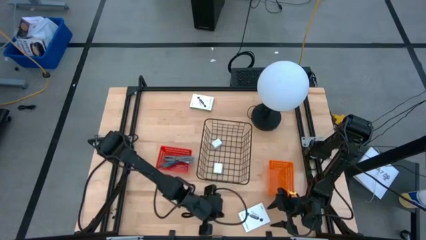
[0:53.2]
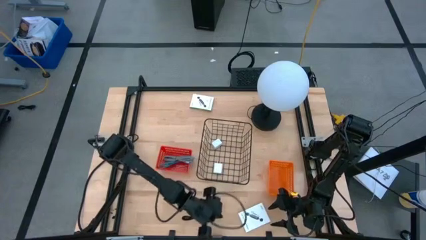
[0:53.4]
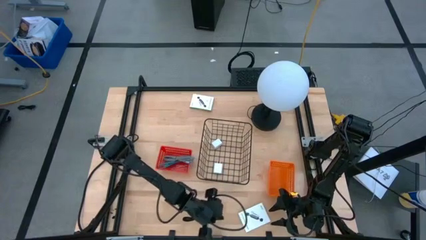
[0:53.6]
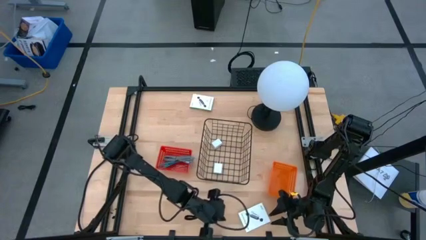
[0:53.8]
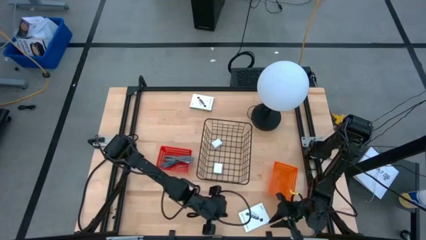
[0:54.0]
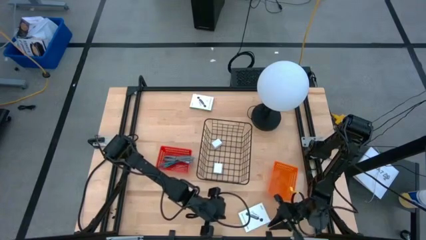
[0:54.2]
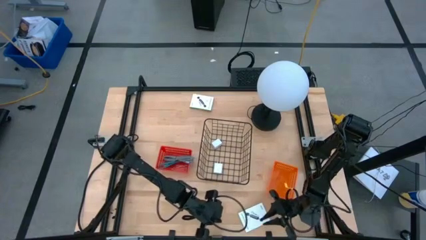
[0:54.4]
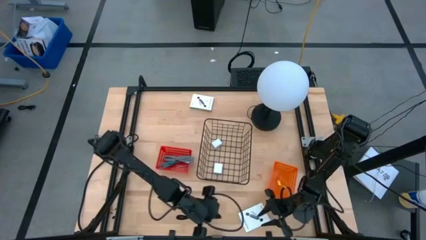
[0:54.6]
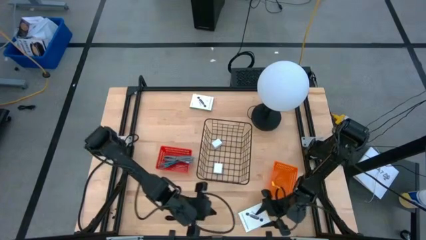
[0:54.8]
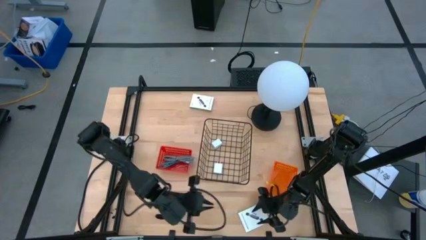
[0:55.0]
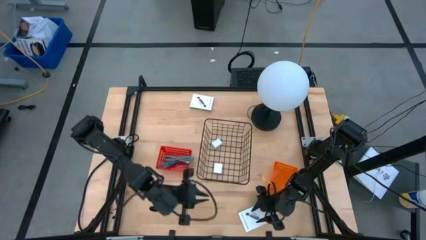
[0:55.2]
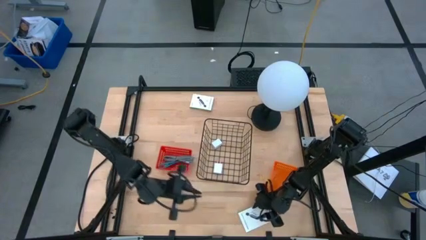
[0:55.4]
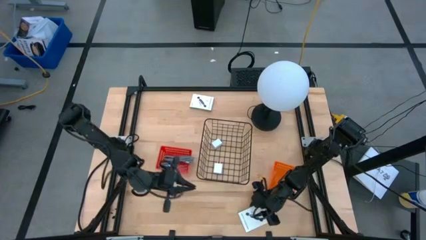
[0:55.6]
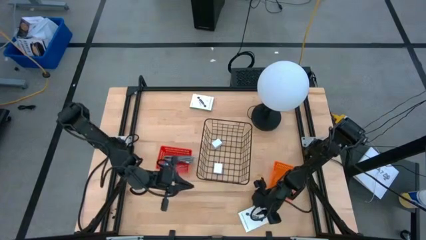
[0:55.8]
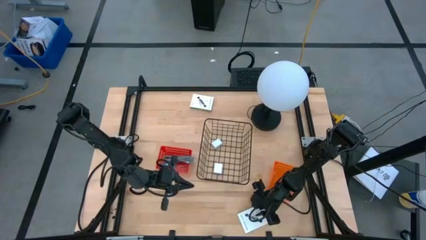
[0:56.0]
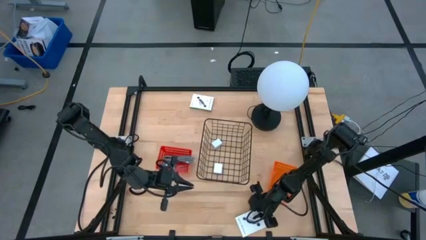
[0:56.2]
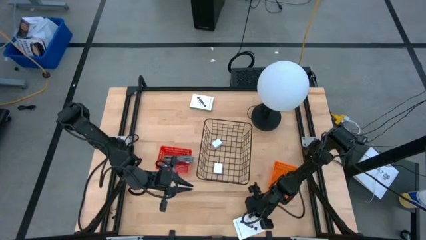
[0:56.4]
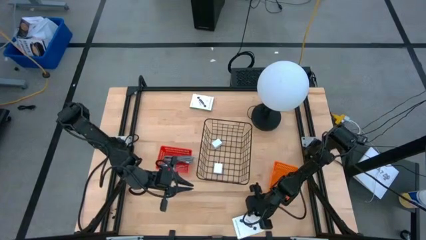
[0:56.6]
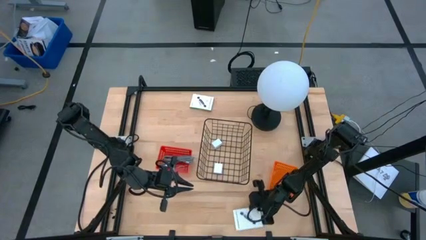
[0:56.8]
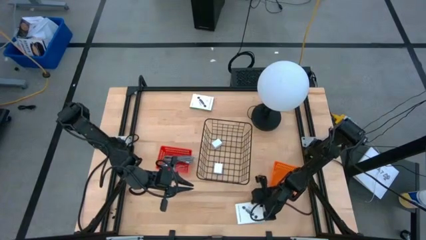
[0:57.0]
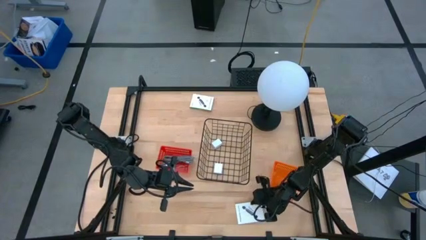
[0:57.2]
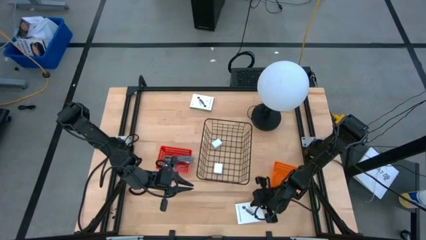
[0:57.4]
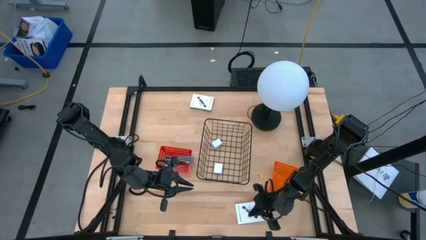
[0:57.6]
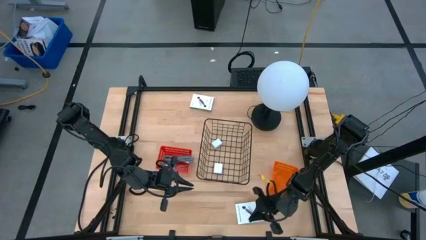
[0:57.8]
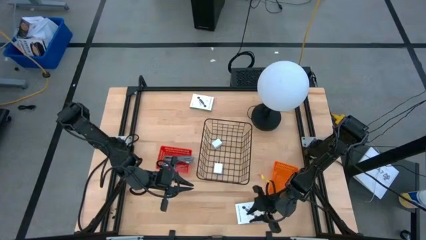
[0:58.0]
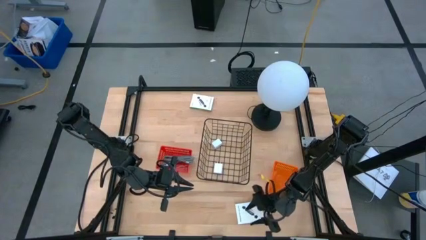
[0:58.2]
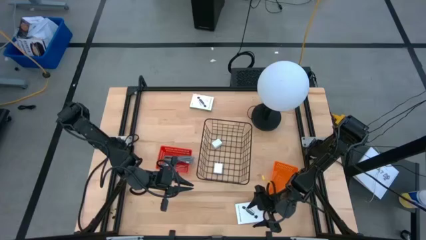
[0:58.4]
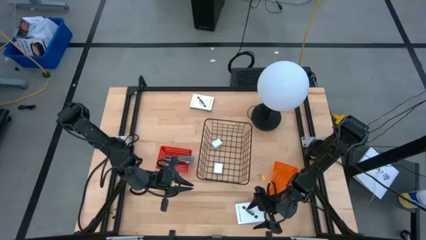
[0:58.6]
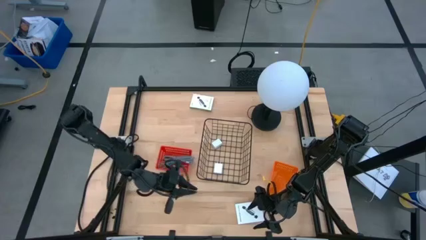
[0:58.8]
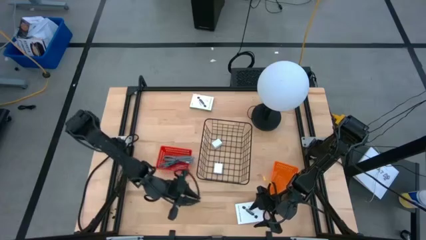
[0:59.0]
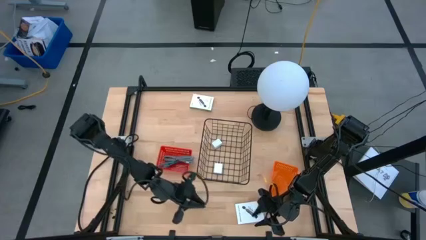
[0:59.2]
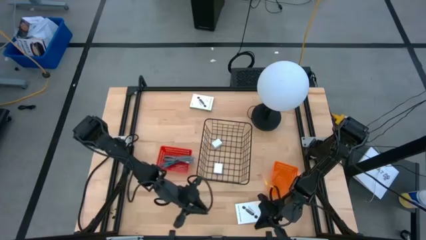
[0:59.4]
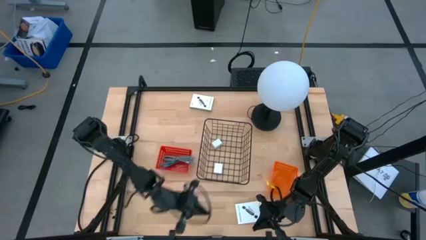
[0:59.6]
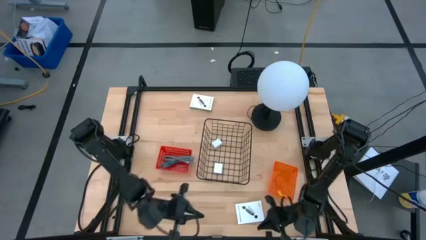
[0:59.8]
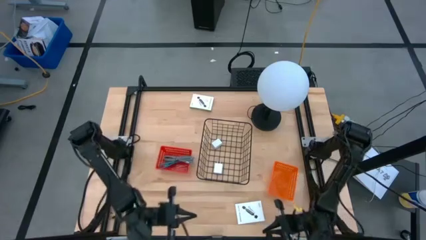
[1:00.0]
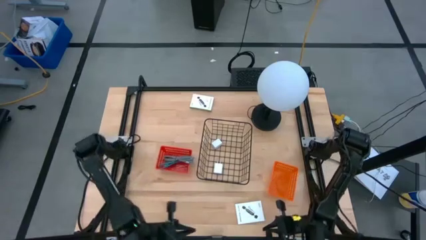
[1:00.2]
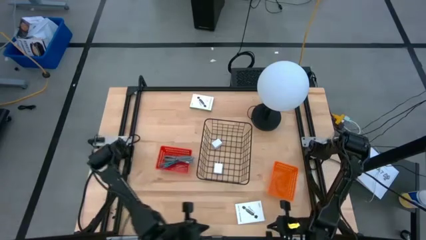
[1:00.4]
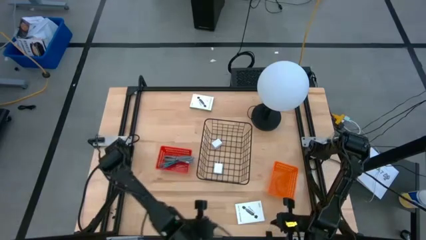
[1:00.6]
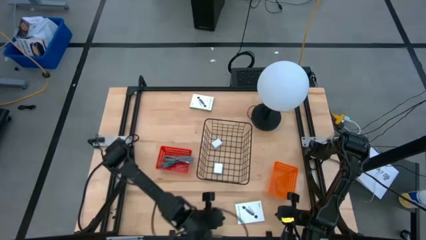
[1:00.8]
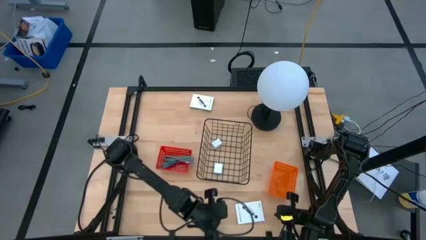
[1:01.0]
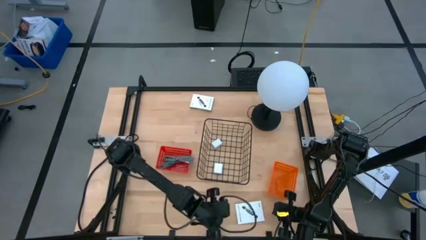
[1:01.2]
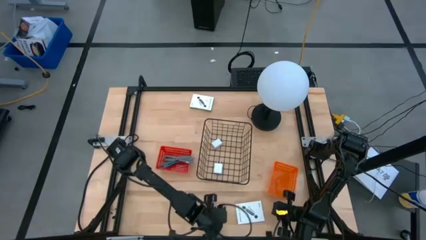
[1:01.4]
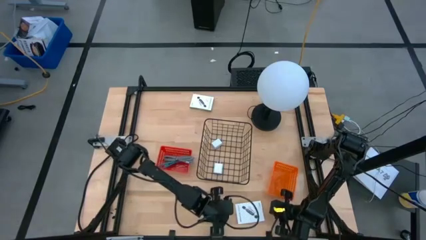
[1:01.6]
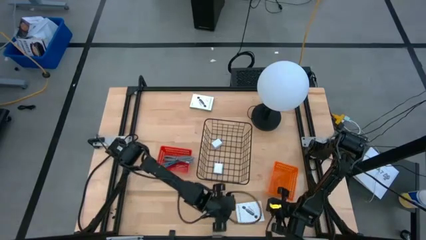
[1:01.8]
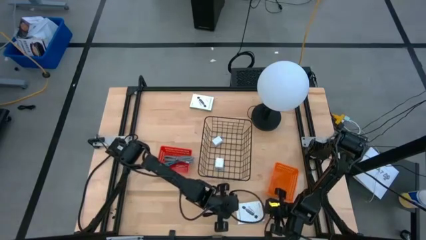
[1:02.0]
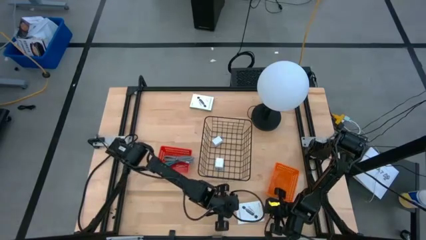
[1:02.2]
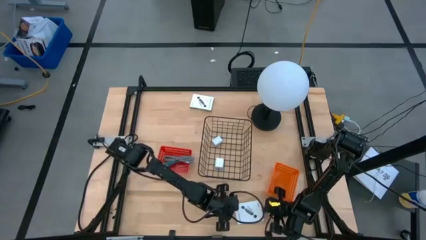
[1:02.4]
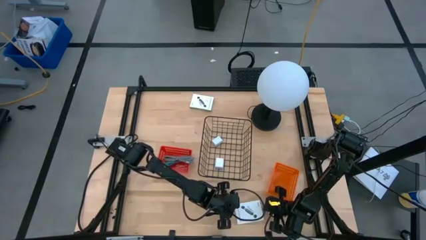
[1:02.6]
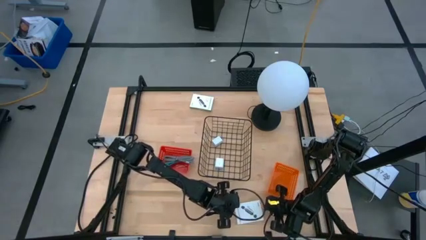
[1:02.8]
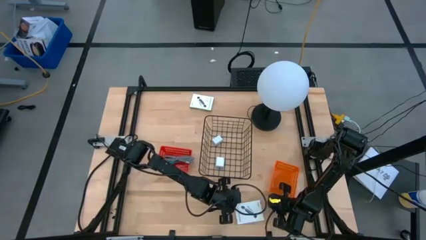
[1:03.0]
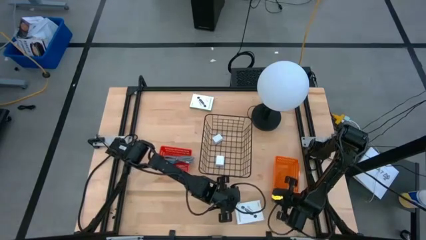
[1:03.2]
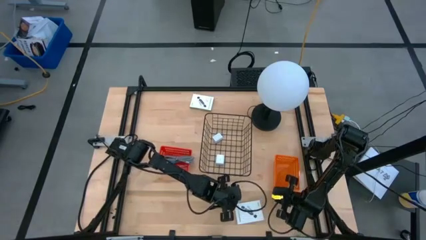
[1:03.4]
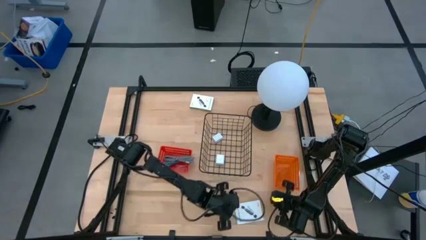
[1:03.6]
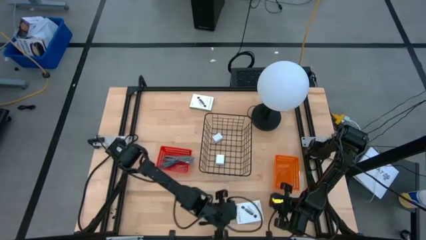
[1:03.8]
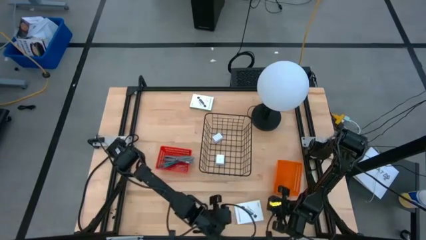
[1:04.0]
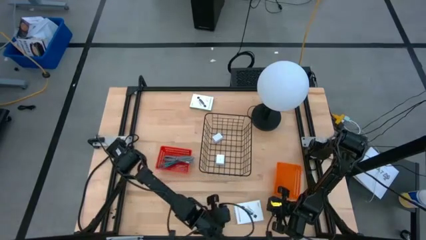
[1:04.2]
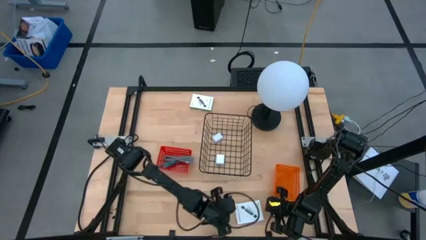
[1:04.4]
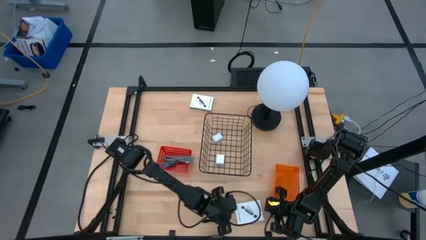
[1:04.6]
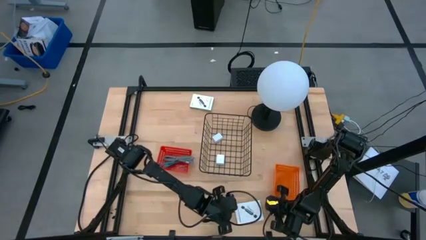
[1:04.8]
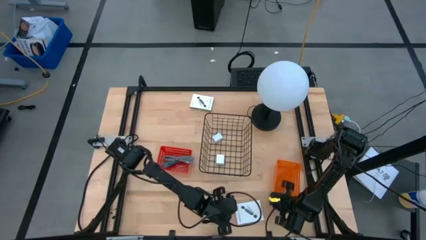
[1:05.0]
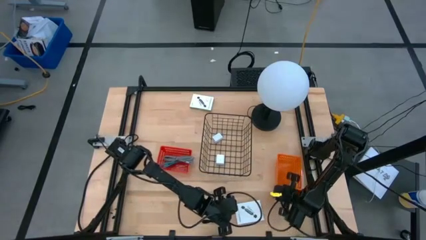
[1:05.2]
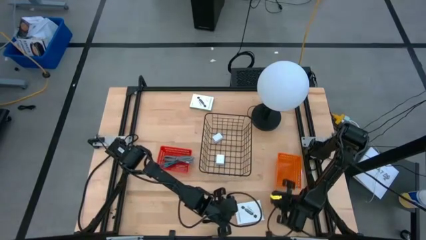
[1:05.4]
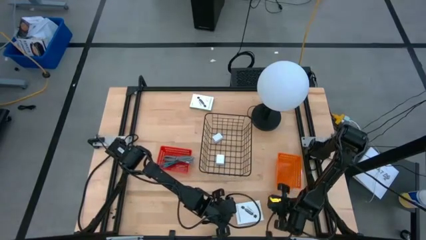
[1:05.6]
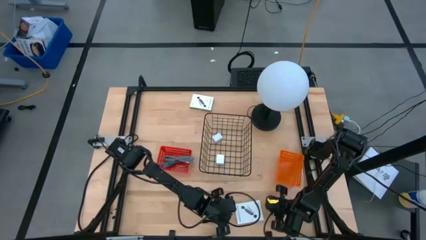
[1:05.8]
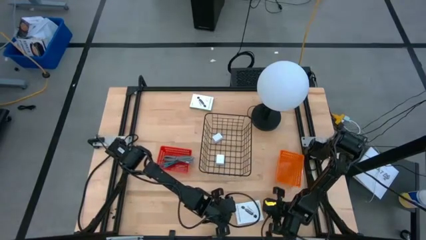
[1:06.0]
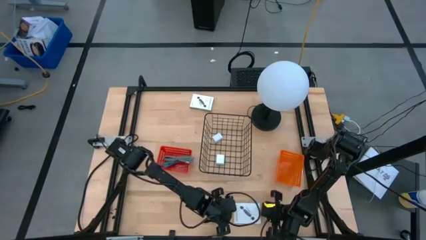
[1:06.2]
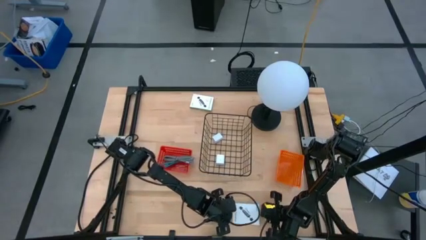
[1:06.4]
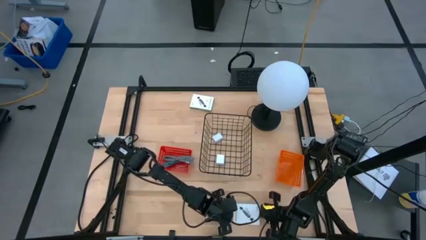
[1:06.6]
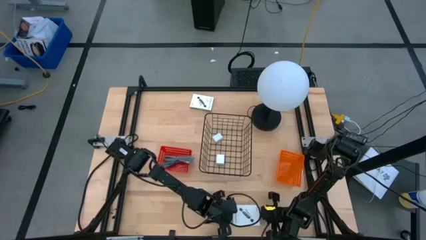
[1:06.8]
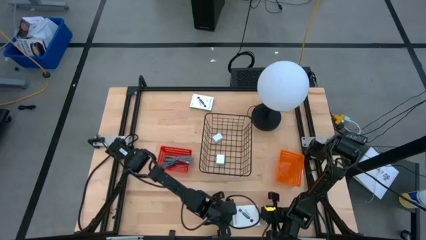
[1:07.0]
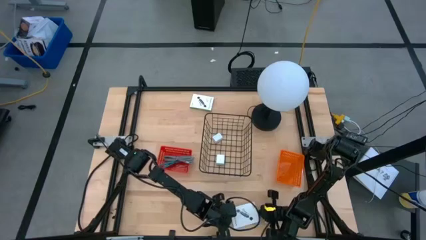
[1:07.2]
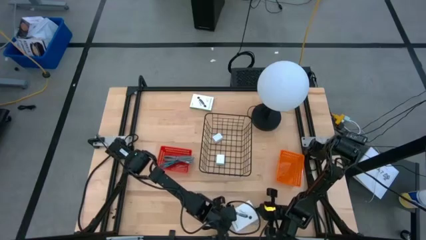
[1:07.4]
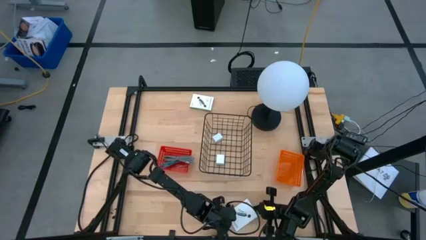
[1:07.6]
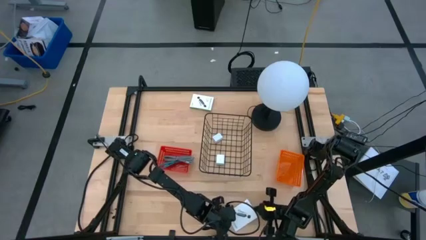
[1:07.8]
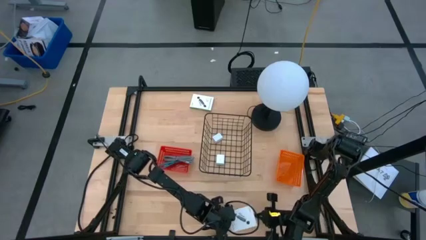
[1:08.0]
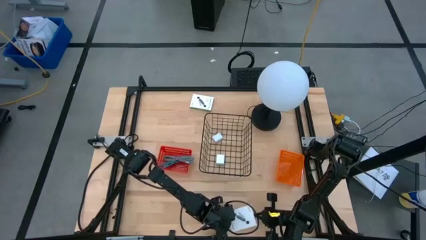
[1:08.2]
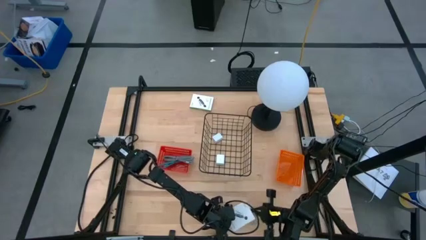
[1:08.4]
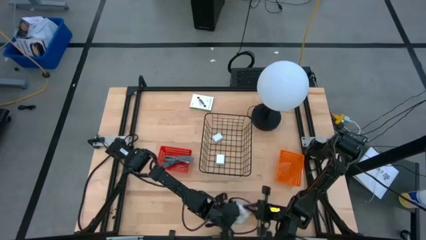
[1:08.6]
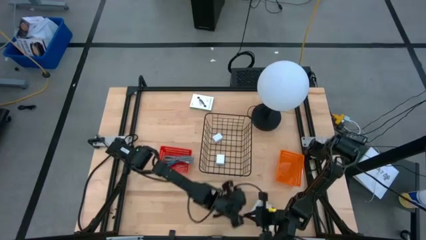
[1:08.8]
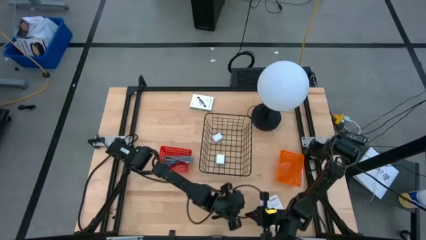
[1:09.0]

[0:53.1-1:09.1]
Task: Pick and place items into bin
Put the bottom card reader box into the orange basket

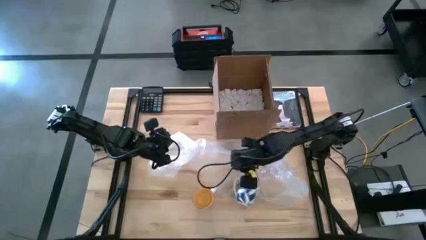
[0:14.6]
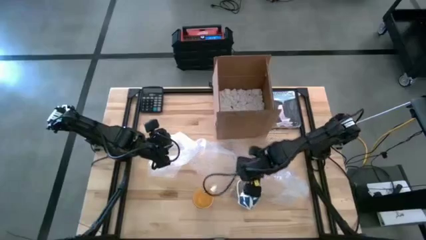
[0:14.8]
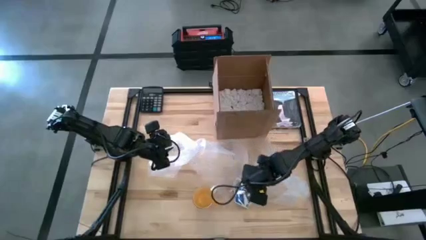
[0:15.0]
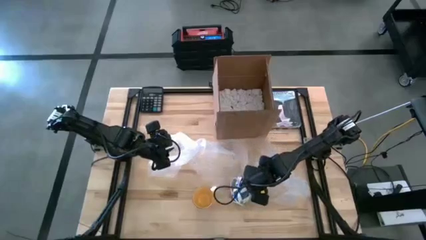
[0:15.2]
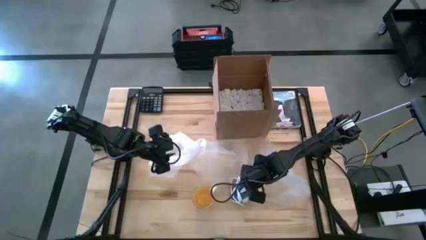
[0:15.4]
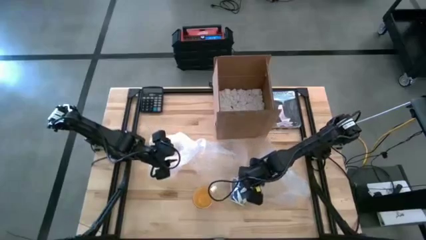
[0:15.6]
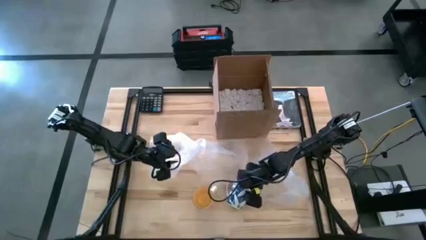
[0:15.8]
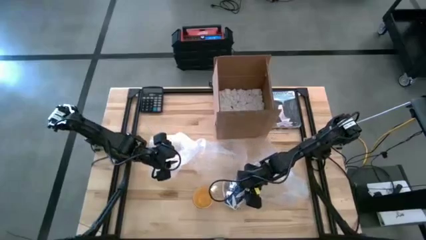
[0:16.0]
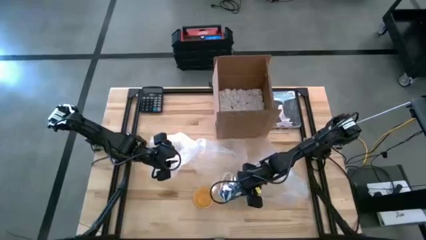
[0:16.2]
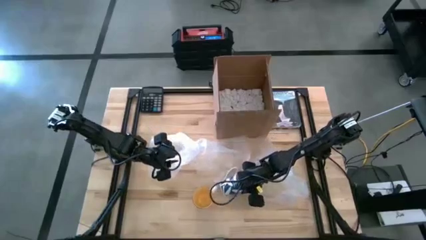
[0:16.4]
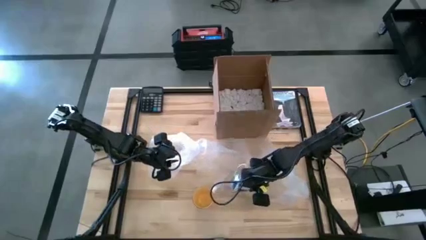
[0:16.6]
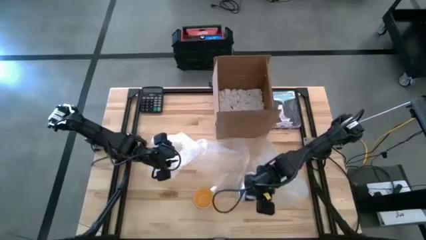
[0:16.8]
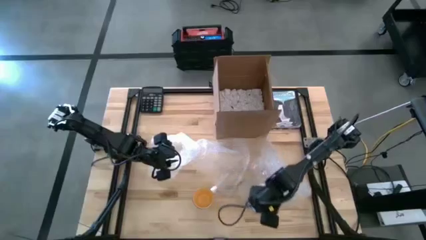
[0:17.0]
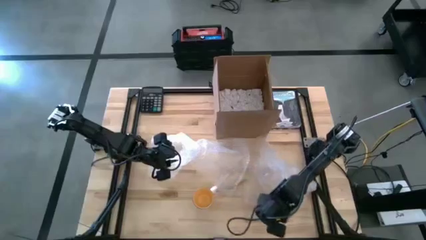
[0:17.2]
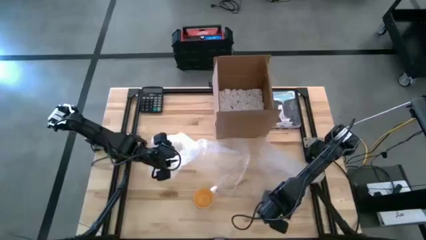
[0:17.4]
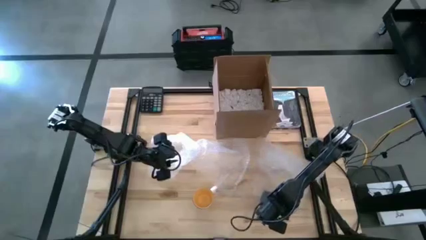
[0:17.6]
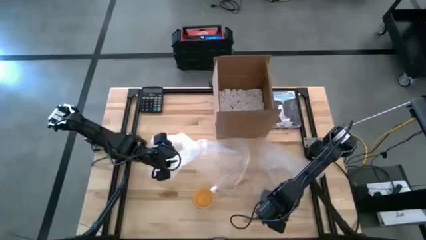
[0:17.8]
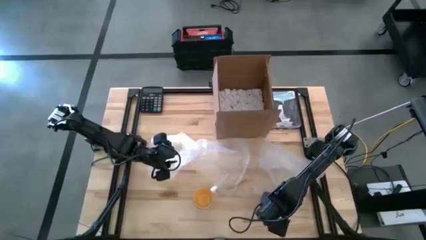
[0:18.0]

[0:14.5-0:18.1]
Task: wrap mug
Adjust the blue patterned mug on the table
